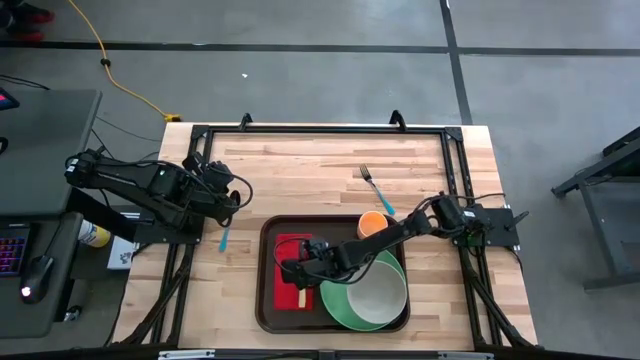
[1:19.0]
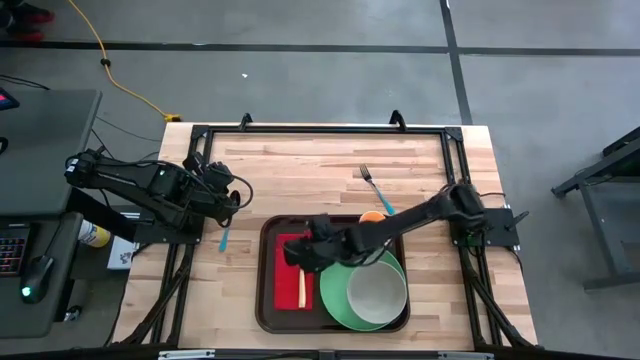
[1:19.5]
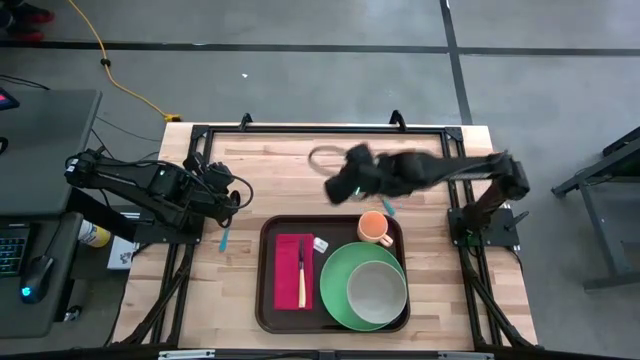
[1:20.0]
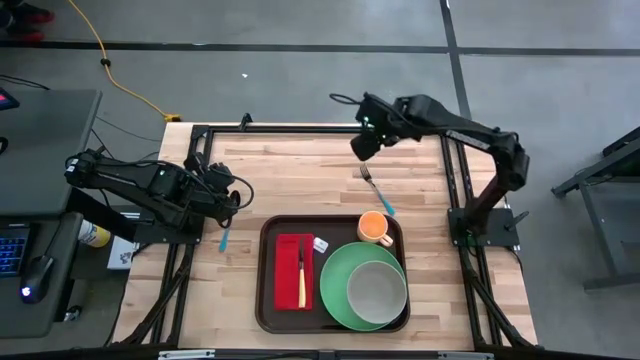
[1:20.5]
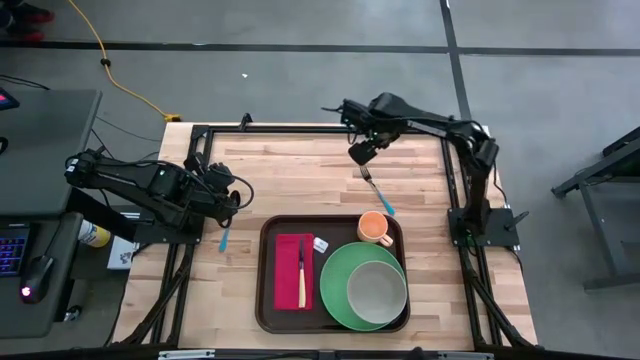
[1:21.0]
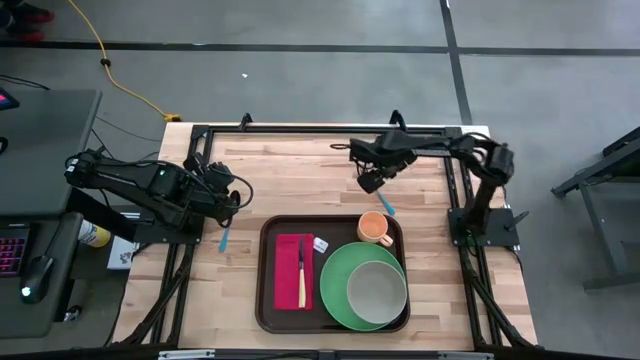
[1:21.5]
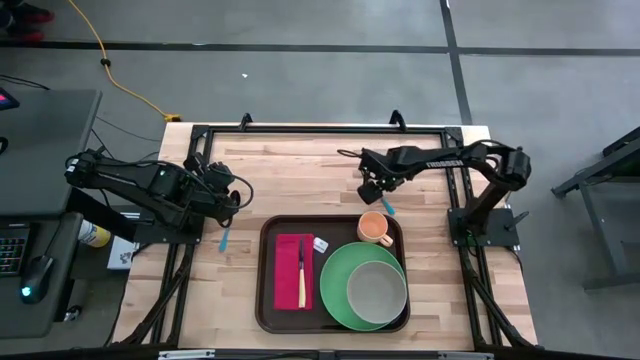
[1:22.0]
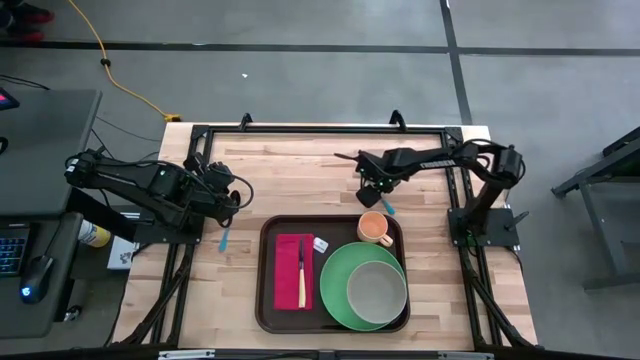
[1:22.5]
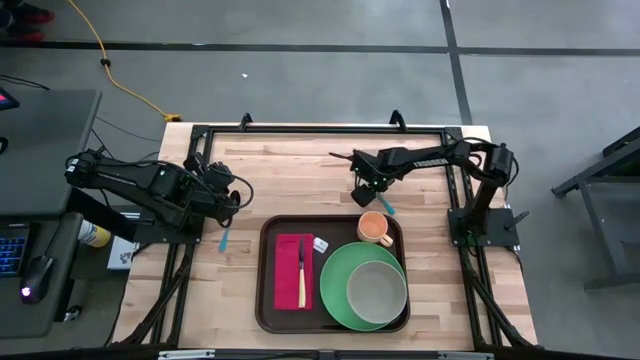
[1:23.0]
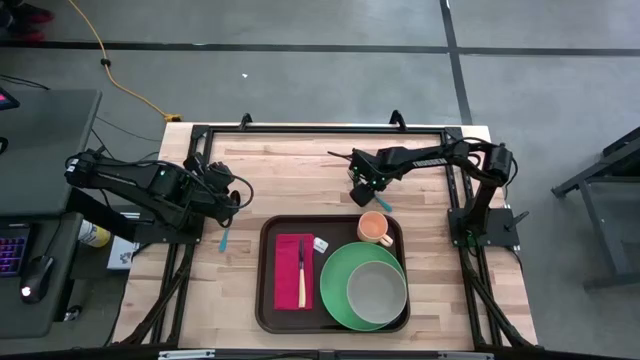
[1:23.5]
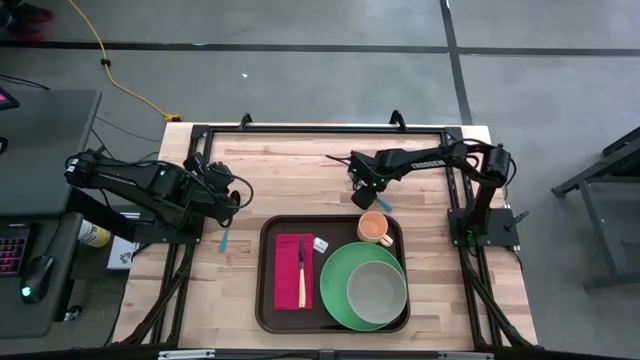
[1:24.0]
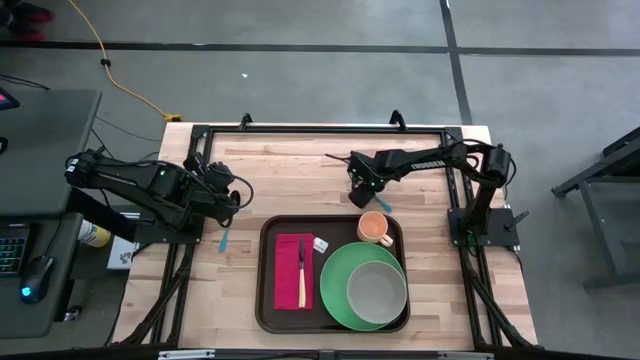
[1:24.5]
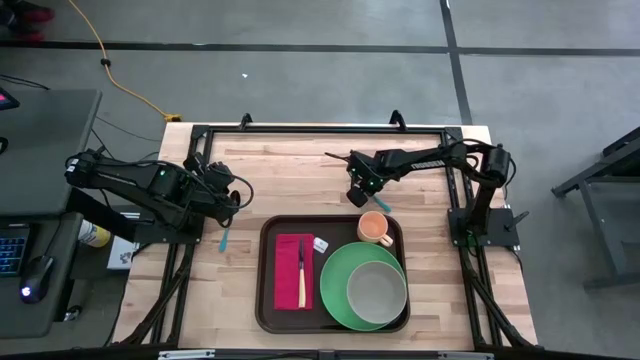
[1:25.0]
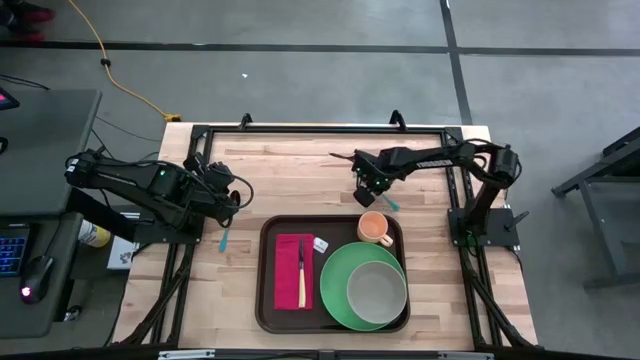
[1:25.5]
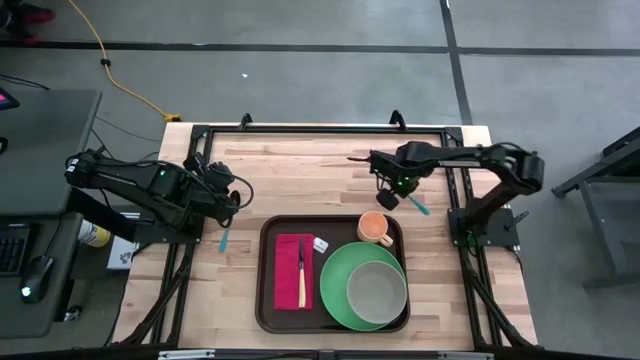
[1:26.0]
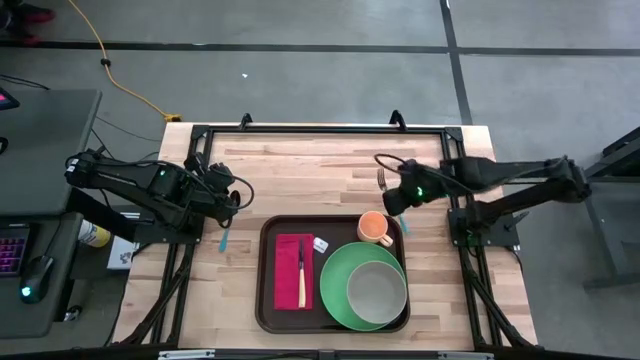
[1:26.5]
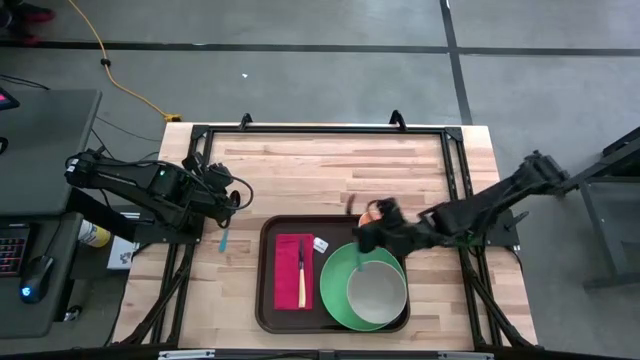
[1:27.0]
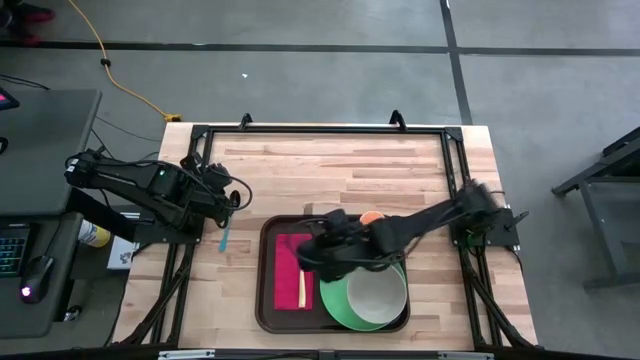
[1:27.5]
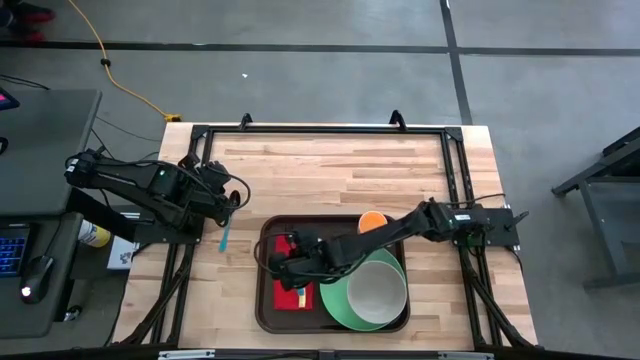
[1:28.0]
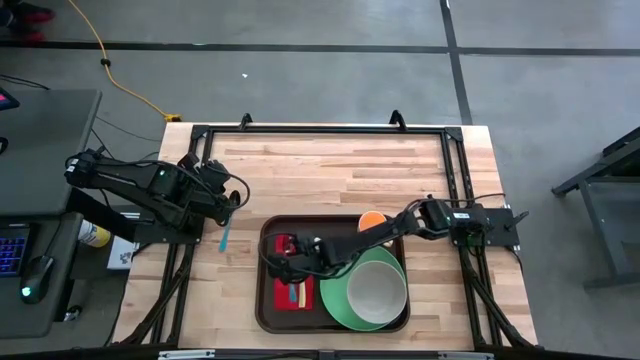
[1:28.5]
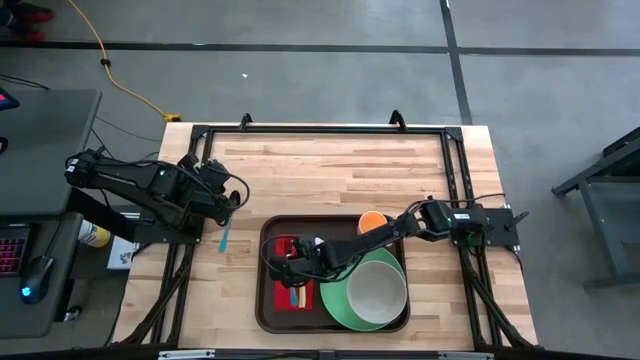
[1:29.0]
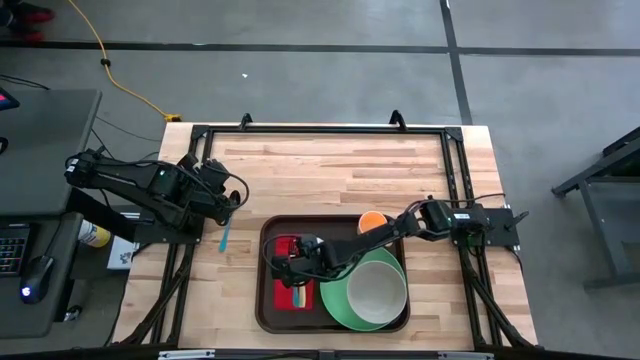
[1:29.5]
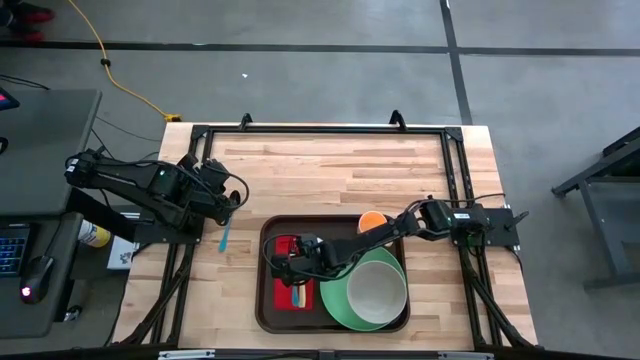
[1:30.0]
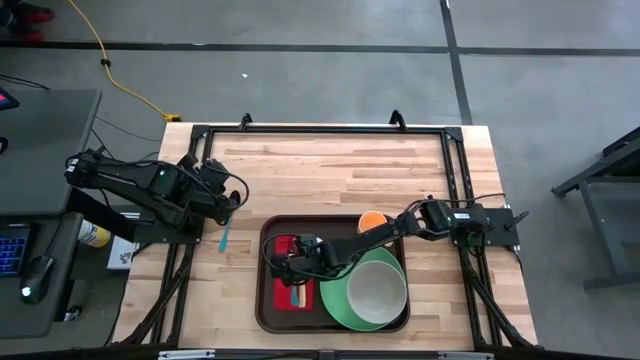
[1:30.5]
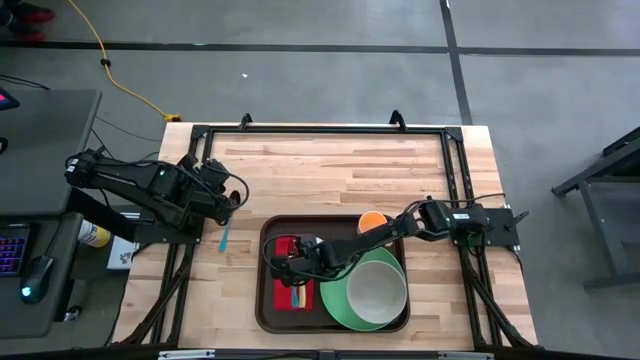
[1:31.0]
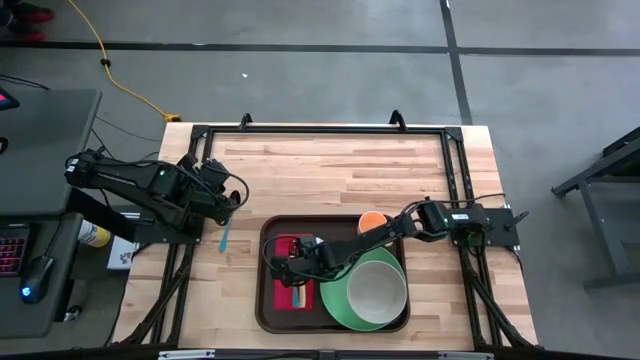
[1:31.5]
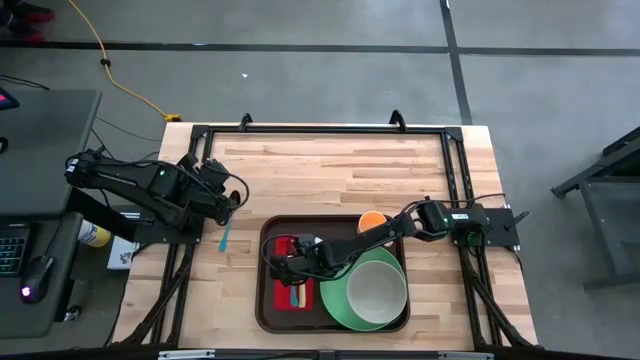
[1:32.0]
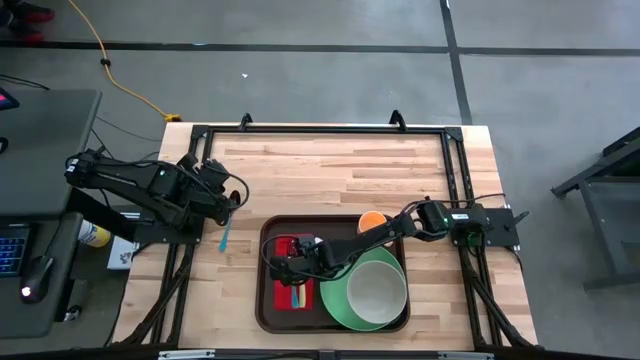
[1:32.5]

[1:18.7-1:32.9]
Task: Set up tray
Put the blue fork on the red table napkin to the left of the yellow table knife

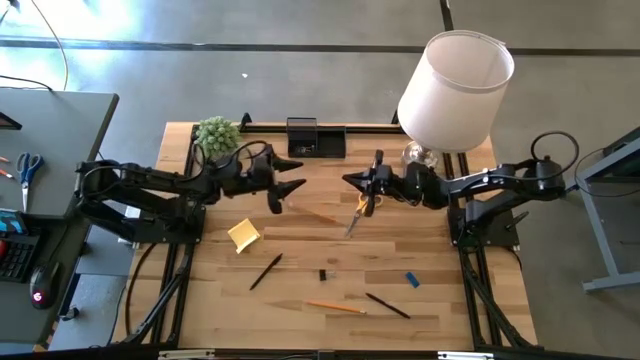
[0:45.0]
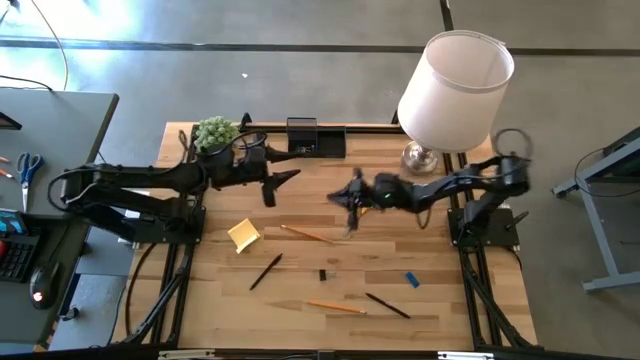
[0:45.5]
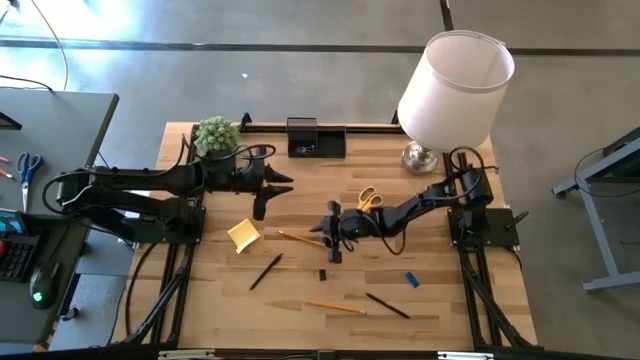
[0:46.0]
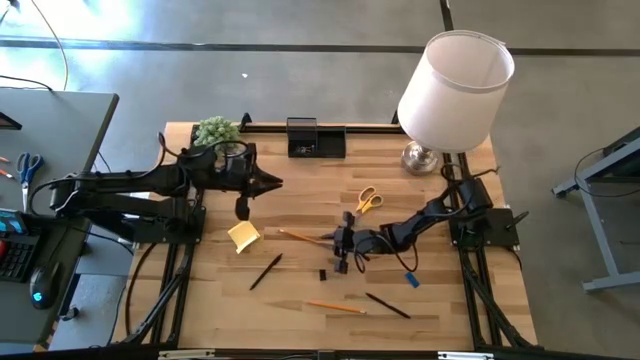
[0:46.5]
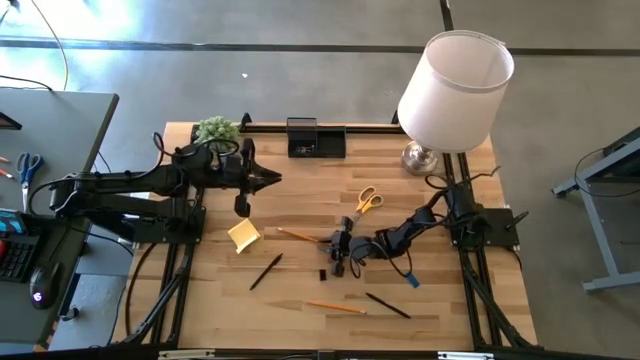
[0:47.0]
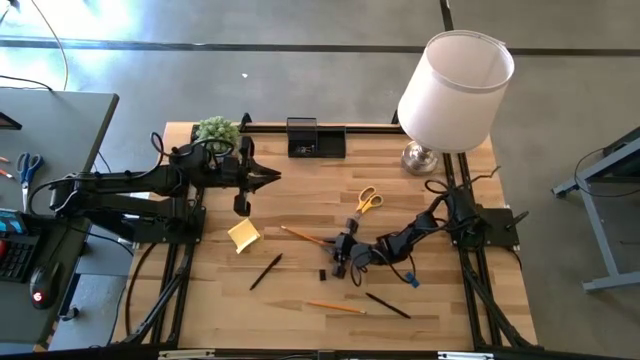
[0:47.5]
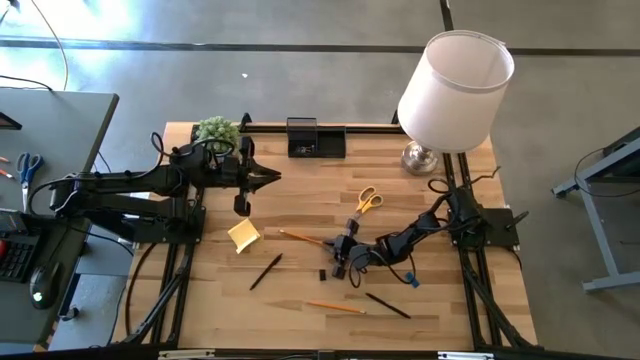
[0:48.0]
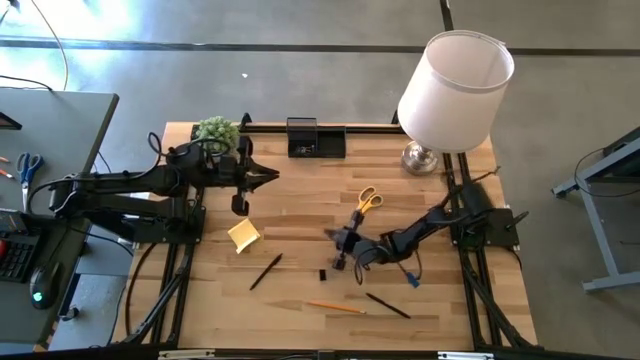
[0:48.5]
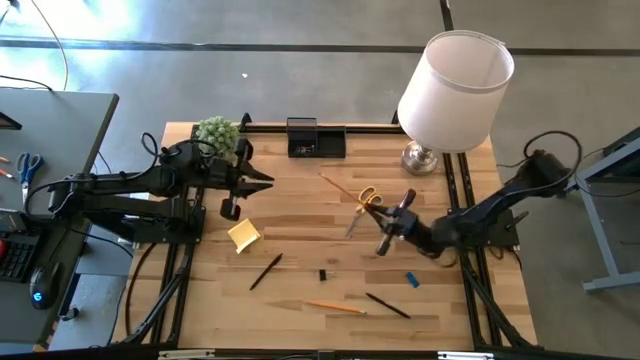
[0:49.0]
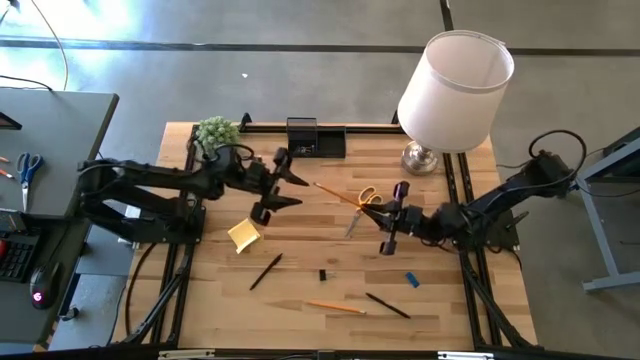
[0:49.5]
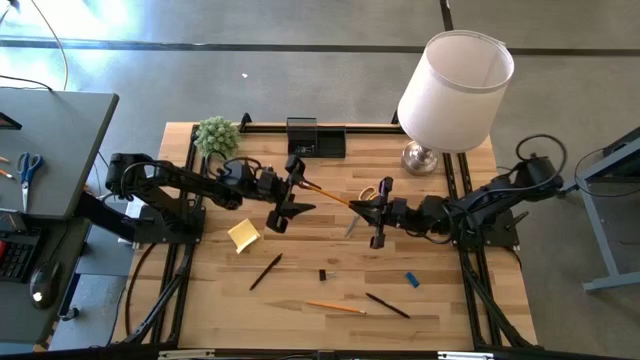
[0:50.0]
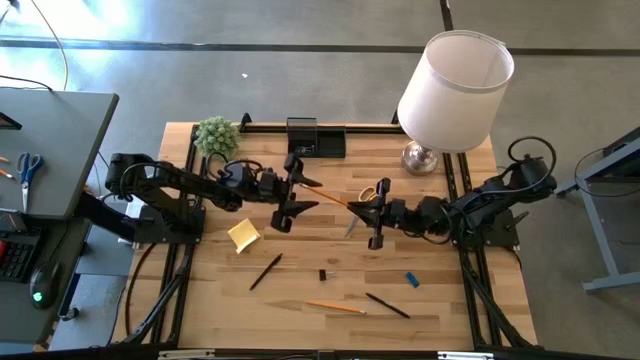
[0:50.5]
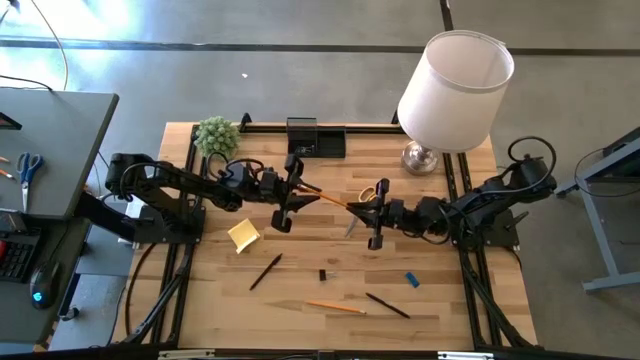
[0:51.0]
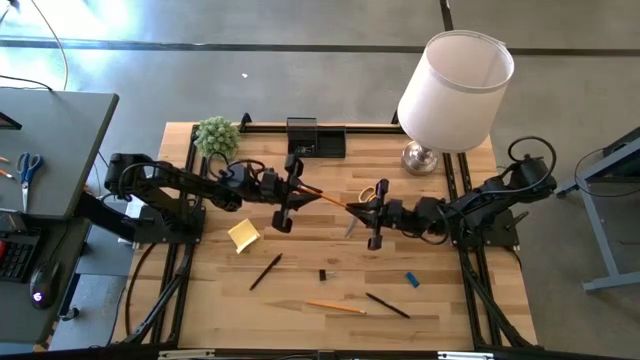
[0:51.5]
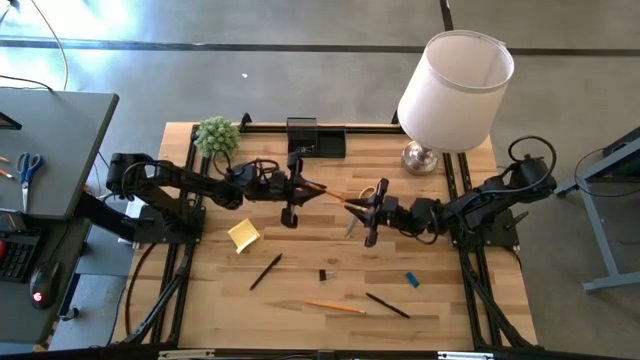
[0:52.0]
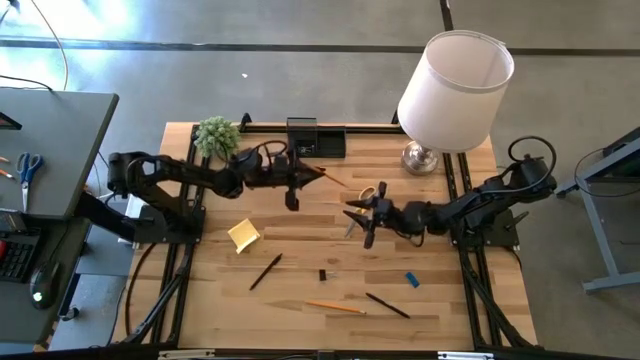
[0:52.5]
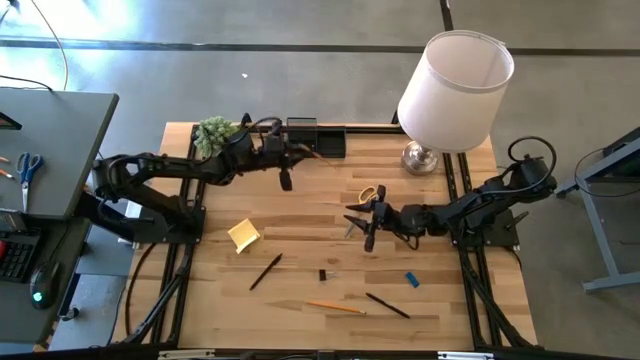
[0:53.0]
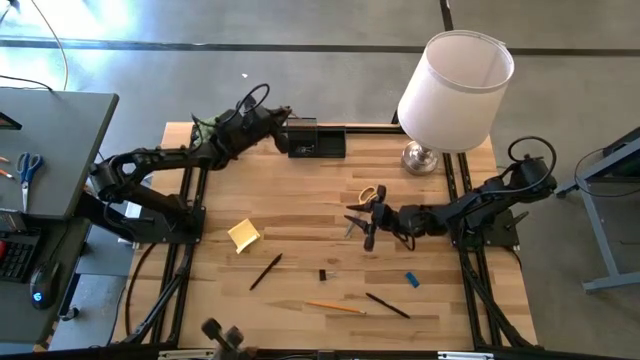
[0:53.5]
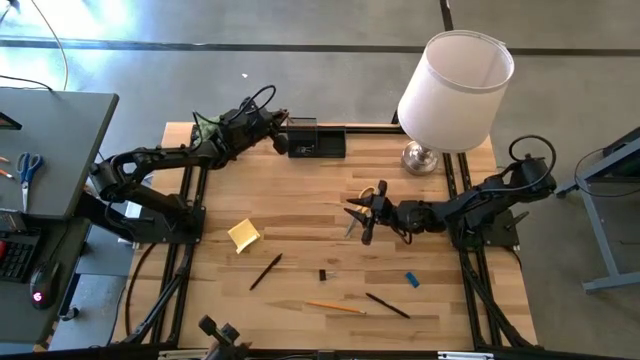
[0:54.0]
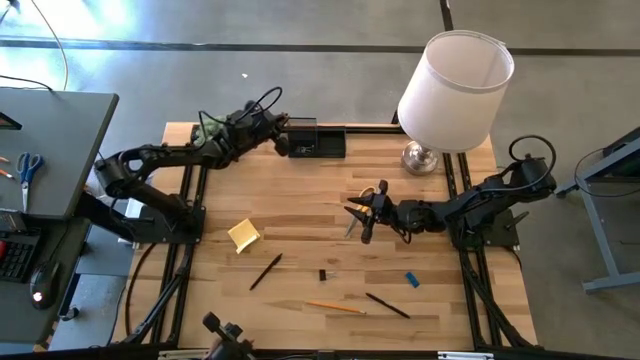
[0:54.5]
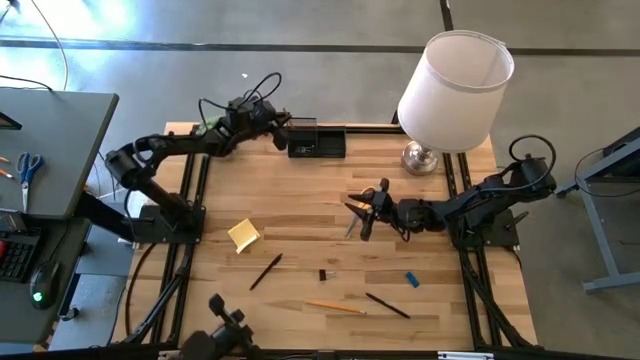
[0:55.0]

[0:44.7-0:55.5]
Task: Pick and place office supplies into organizer
Put the top orange pencil into the top left slot of the desk organizer
